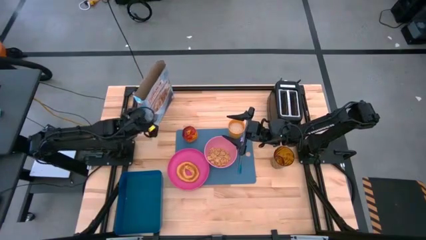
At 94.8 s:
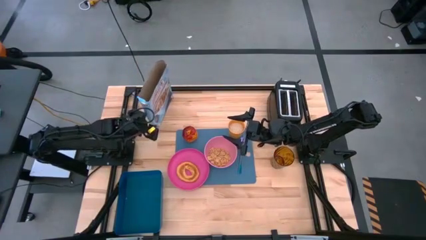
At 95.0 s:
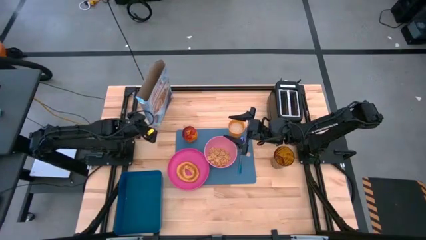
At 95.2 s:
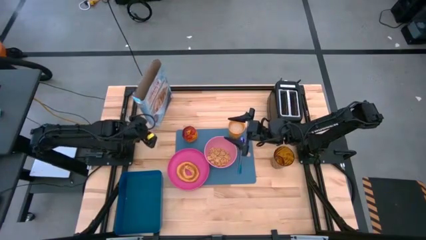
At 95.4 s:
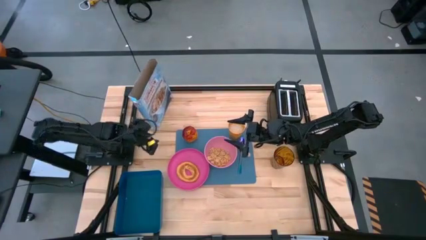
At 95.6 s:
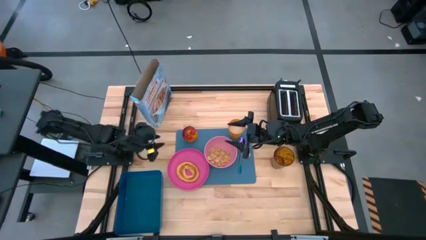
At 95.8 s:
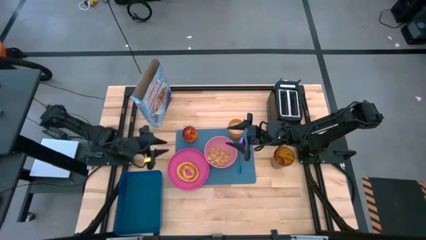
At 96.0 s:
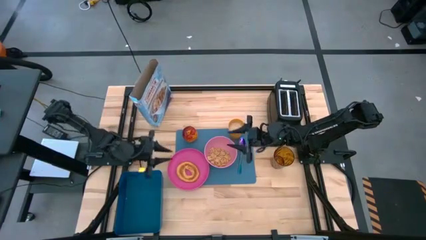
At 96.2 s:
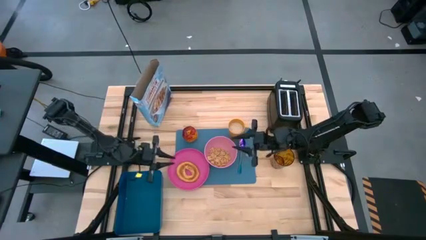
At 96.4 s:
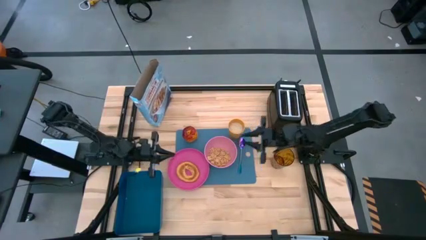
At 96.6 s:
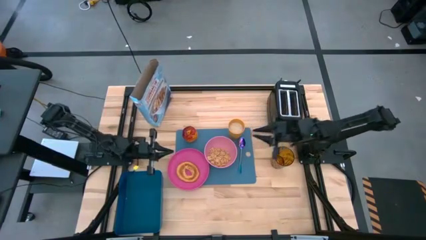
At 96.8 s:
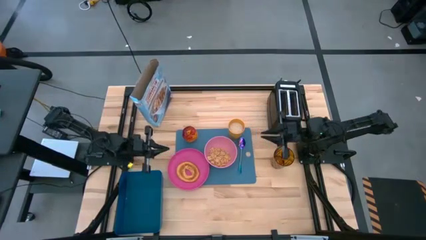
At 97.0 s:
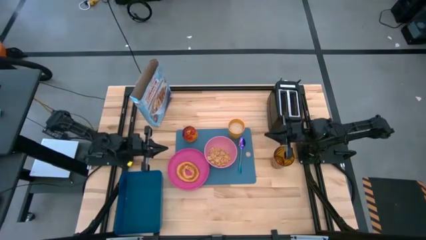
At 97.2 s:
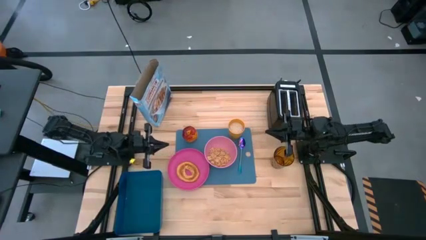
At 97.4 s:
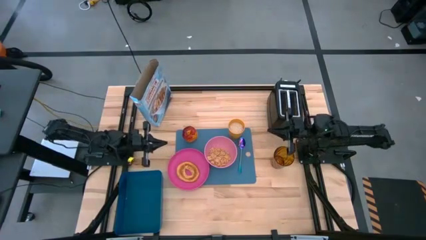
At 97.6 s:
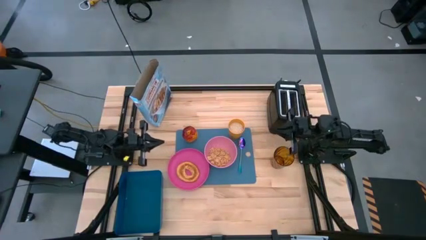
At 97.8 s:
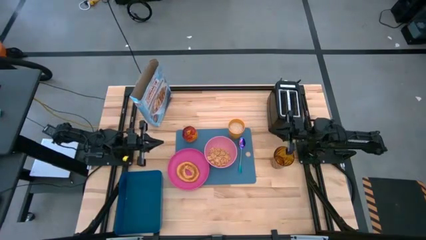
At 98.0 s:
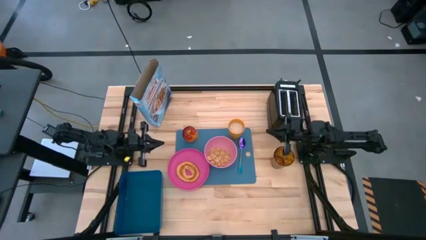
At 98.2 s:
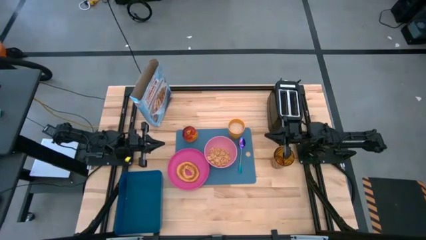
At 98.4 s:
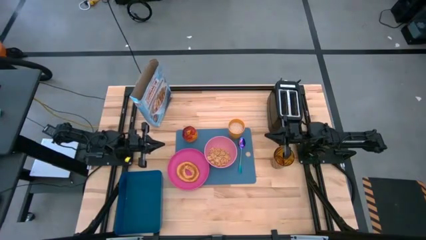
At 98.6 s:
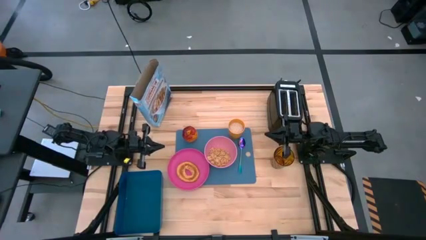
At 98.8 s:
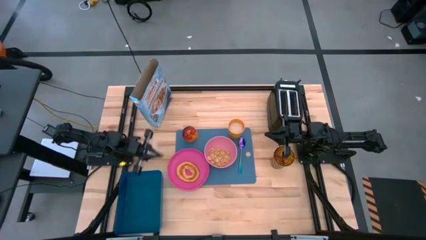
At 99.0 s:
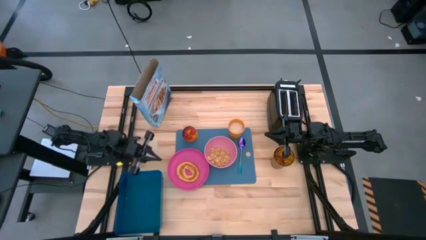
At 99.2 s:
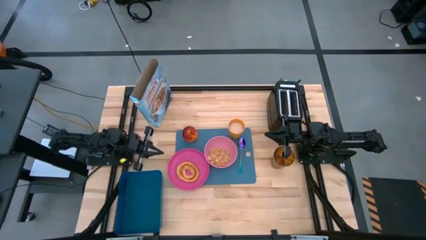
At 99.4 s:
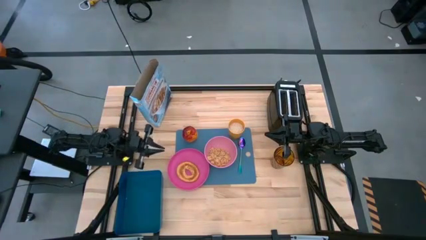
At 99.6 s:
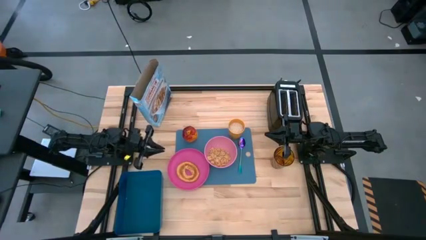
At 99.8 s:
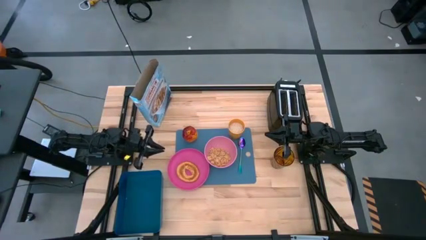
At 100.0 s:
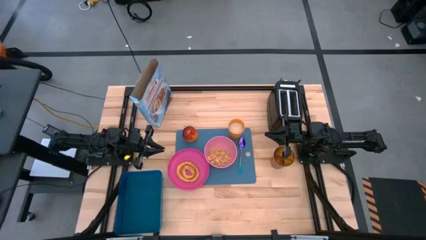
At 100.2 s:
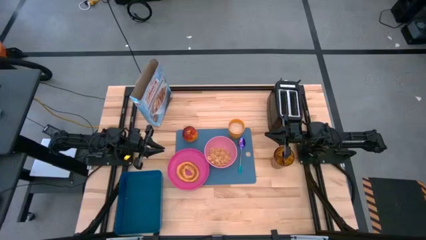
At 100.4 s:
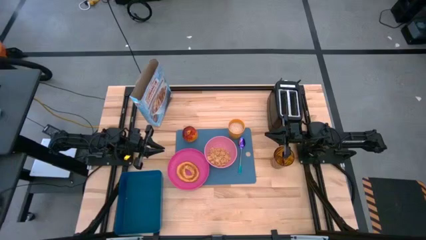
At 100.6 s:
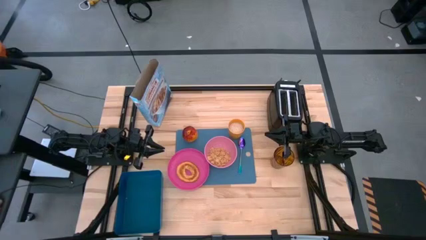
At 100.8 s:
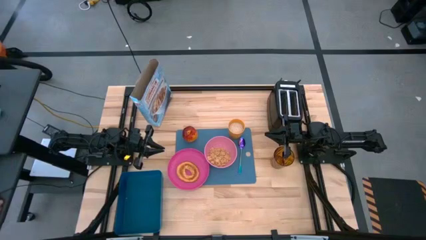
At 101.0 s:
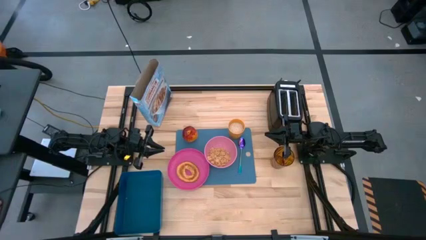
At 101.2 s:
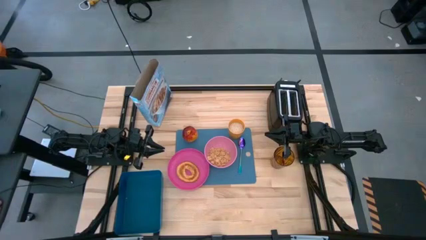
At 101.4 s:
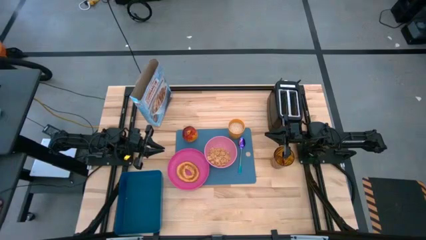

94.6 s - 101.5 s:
Task: Arrange a breakfast setting
Return to Home Position

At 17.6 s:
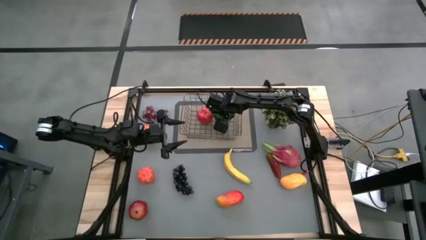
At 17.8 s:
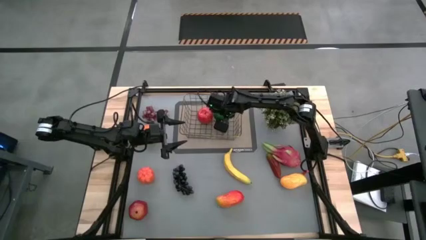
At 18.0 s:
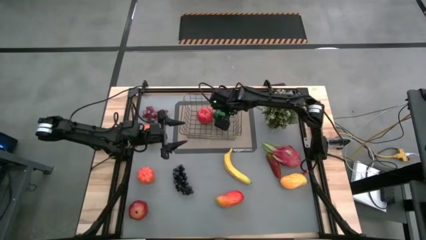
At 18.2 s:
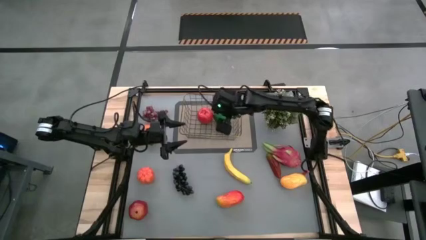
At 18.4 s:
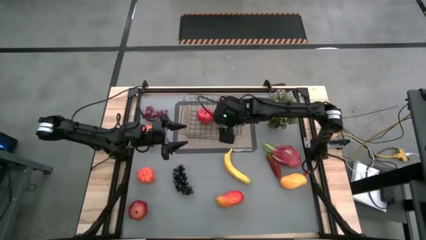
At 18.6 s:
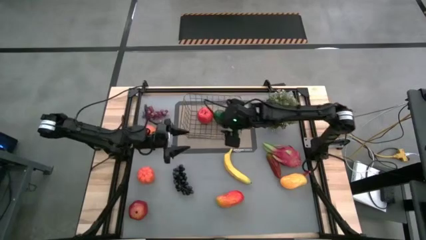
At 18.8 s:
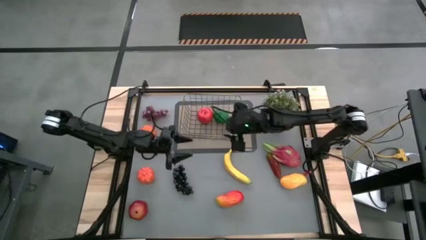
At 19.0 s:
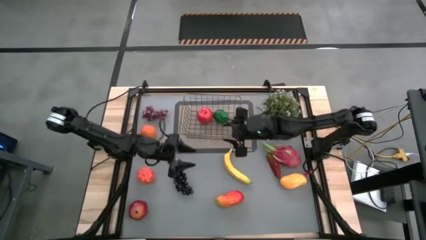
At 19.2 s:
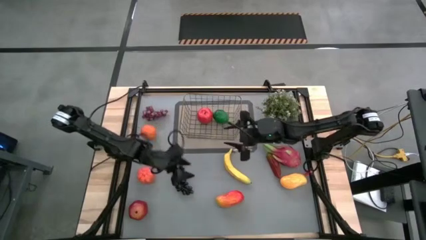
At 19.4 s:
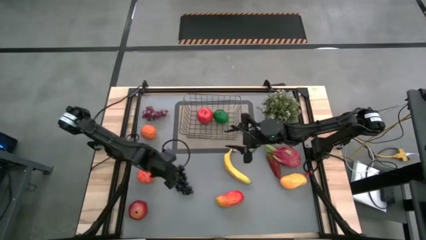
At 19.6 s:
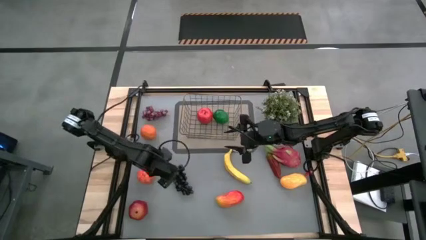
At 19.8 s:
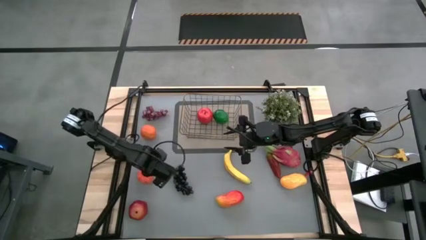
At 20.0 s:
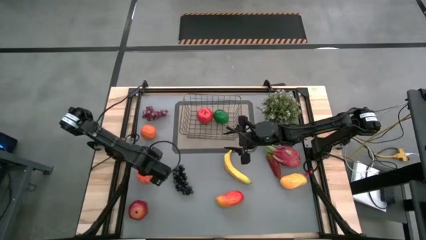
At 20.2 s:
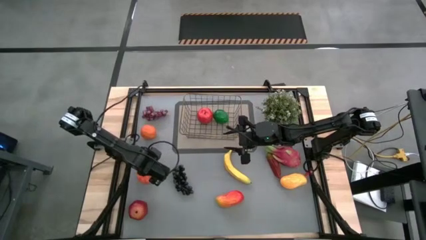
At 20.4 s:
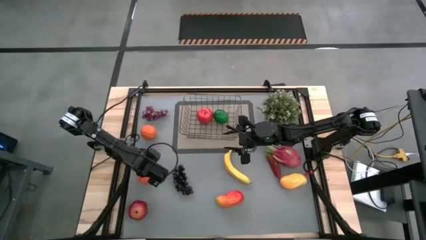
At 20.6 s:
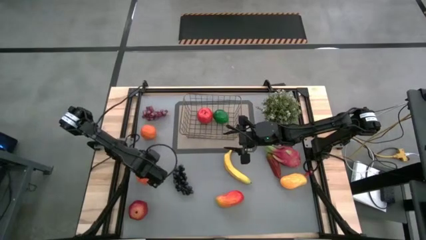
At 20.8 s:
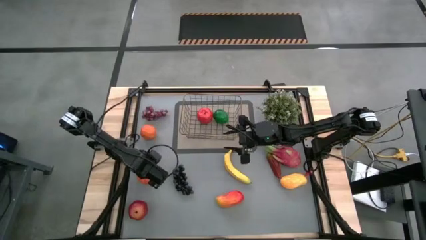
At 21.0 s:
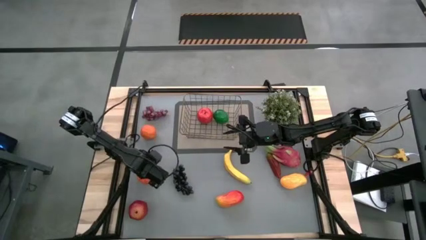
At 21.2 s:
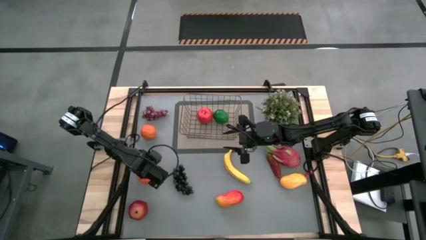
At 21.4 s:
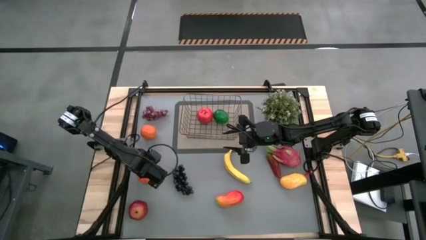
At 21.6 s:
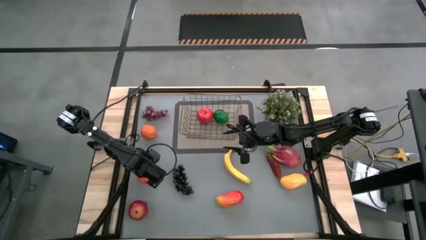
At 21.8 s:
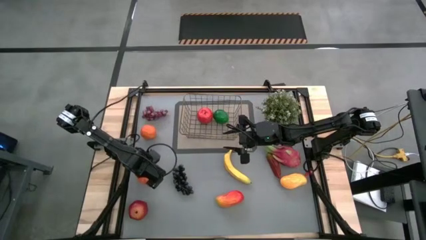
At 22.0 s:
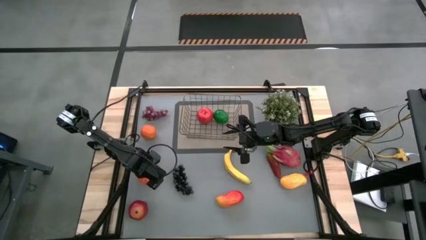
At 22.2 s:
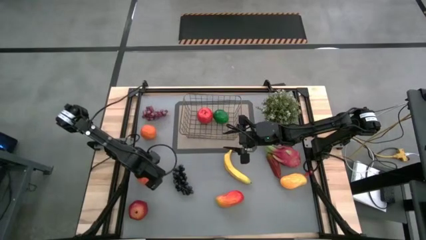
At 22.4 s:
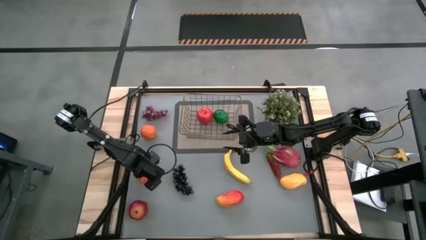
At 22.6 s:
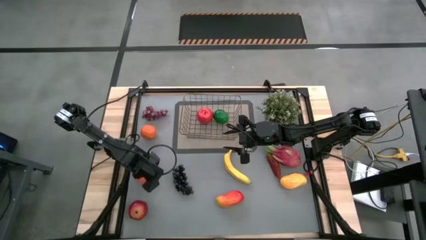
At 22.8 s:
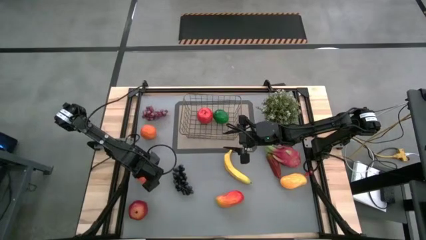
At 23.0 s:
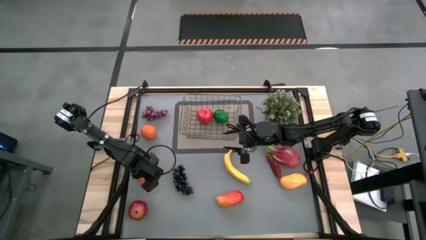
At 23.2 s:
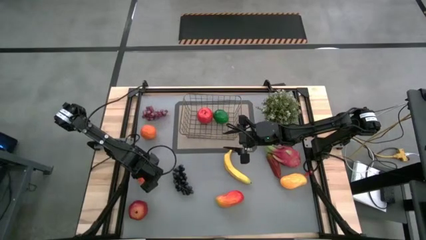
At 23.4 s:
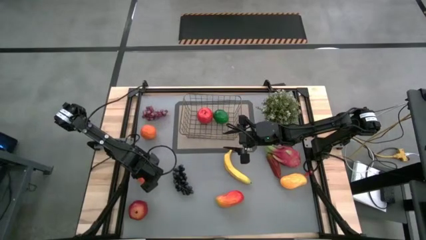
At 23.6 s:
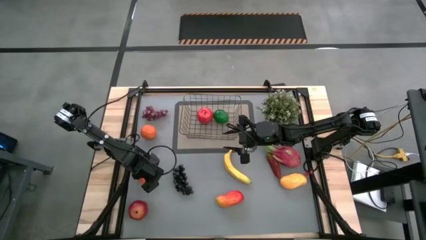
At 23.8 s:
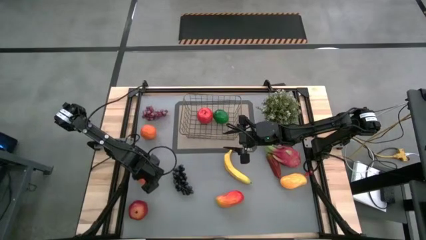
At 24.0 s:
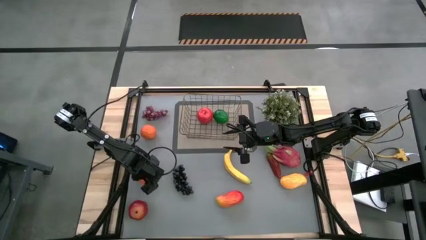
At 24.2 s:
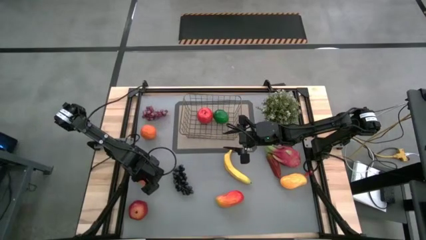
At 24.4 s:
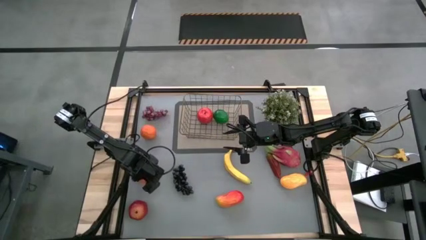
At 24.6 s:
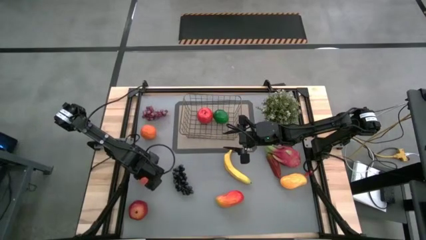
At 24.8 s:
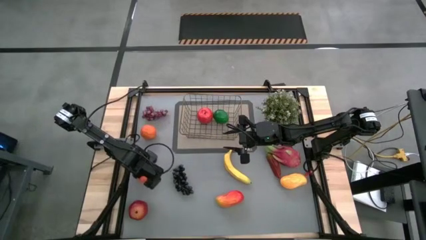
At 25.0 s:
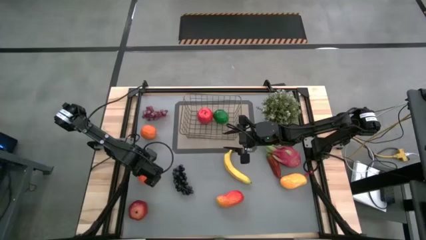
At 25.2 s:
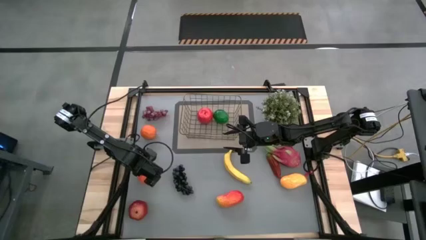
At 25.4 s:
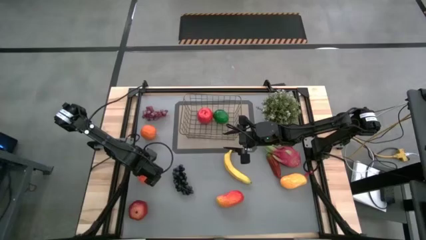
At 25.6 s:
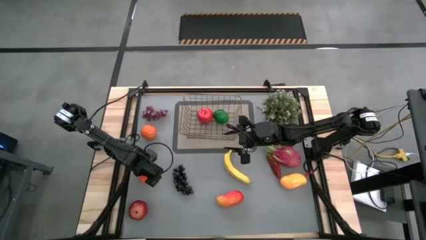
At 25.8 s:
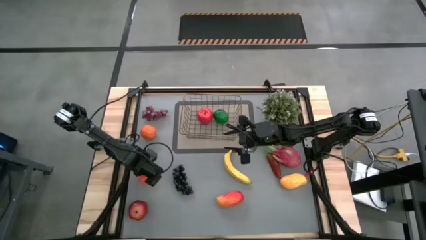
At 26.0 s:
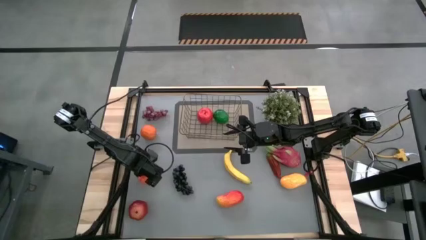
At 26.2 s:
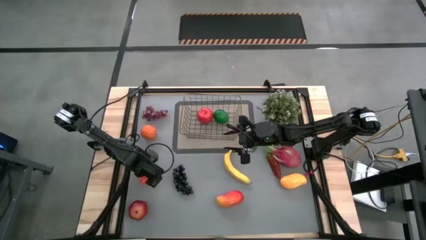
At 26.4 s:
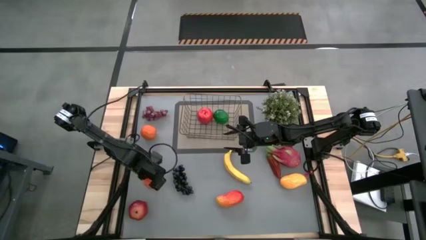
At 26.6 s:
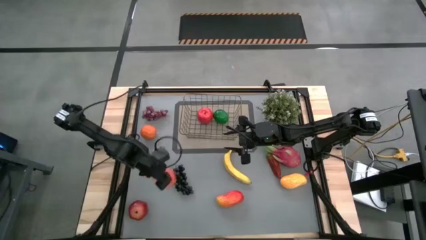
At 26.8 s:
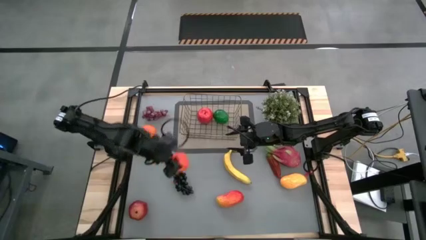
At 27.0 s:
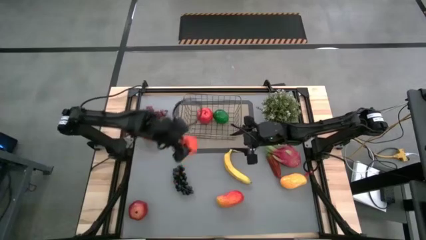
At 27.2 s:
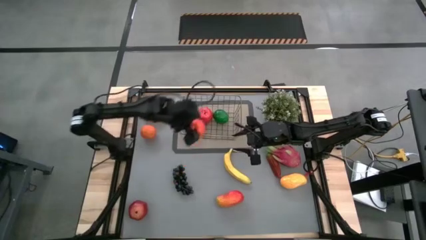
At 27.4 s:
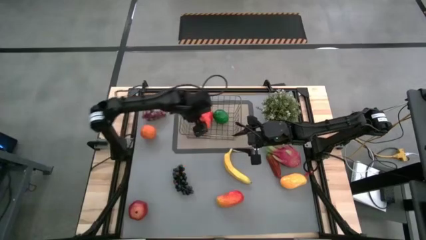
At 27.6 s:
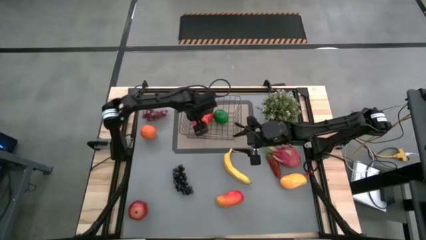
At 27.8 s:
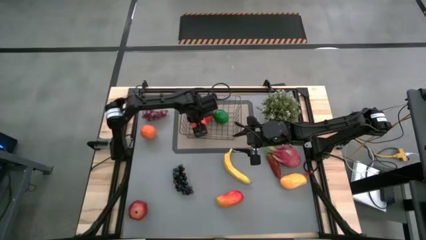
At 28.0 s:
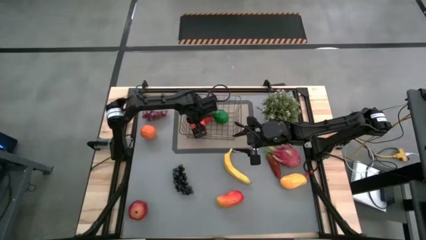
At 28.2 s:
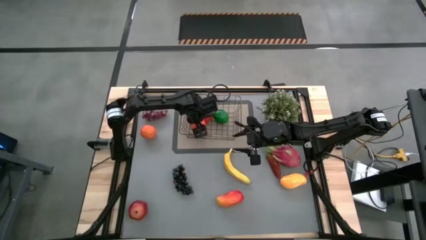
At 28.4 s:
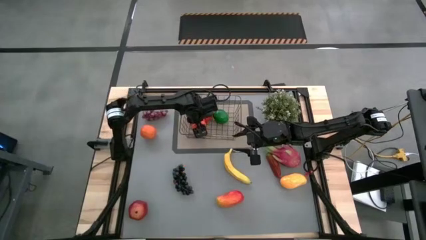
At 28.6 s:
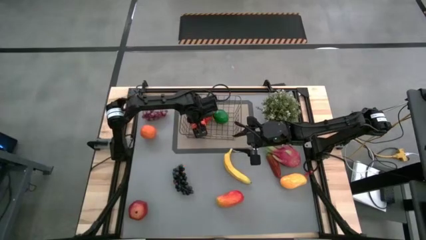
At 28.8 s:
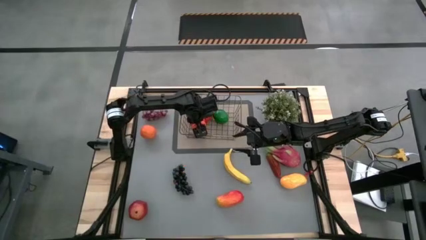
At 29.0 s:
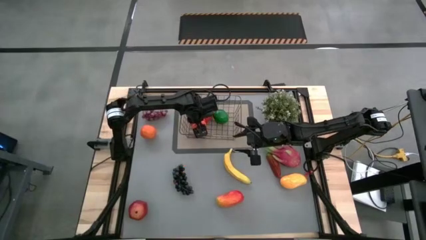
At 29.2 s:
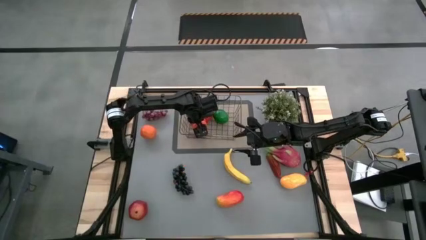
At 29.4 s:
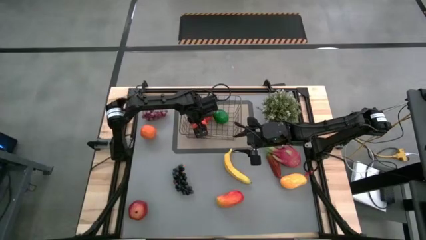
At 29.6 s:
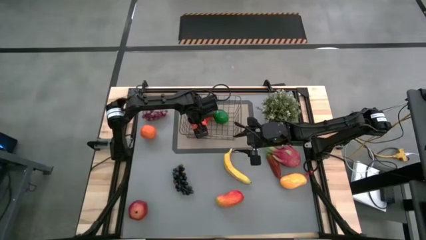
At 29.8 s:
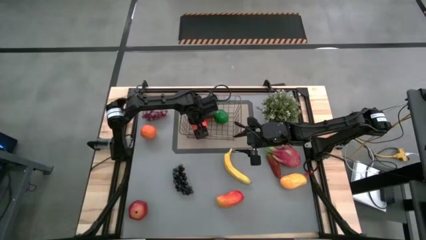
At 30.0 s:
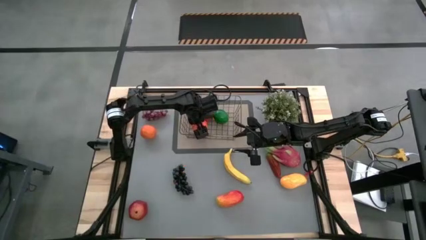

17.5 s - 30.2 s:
Task: Build produce basket
Put the pumpkin into the wire basket
